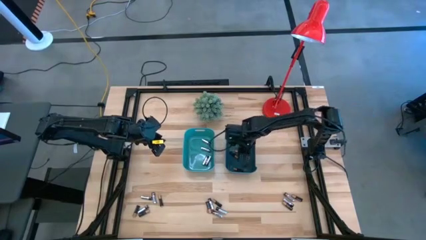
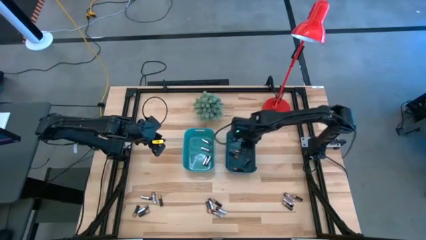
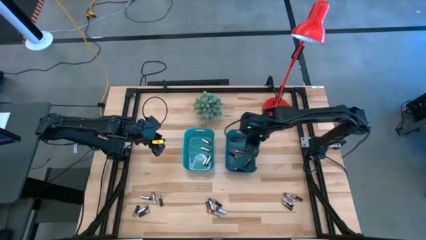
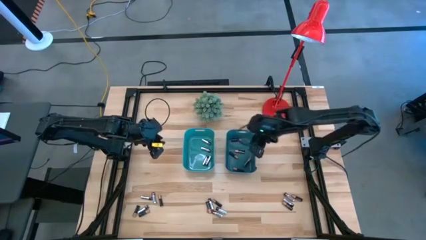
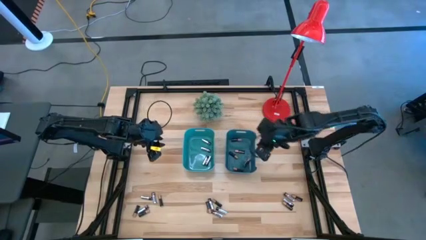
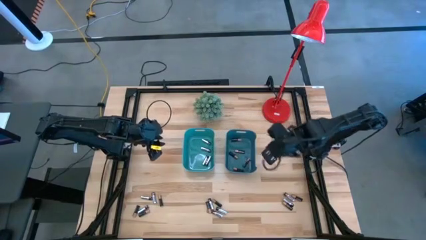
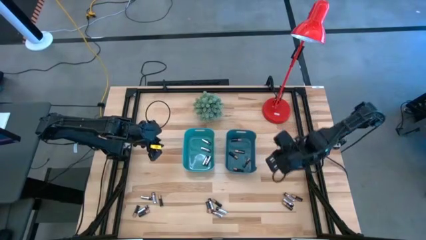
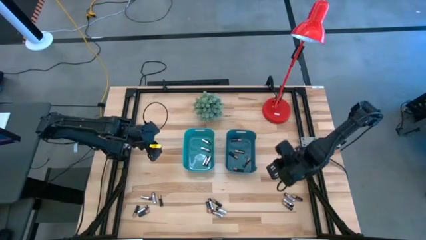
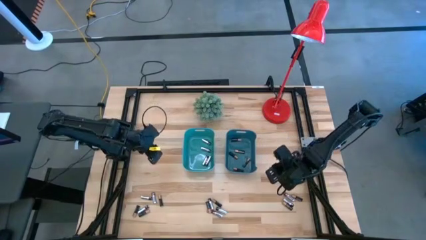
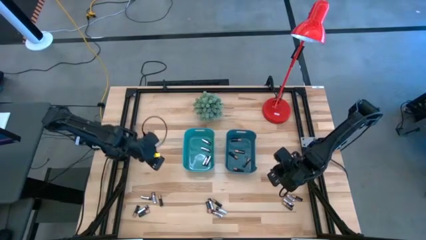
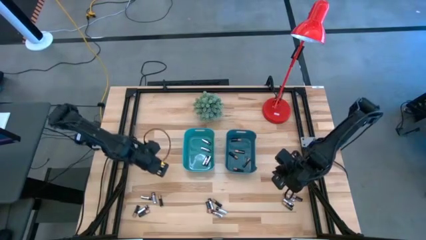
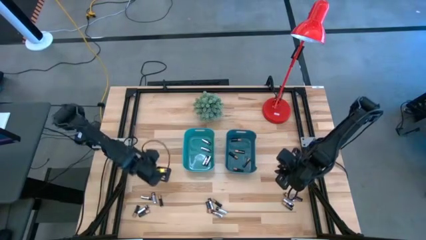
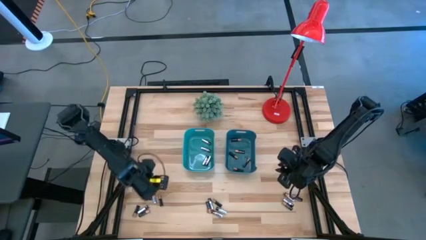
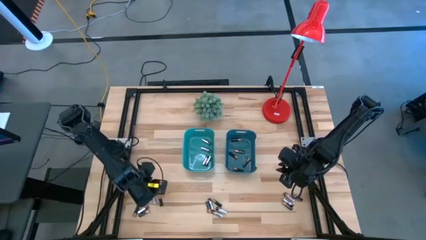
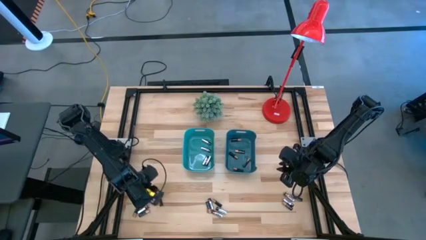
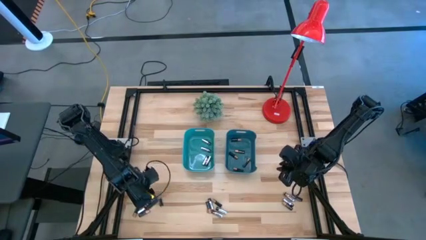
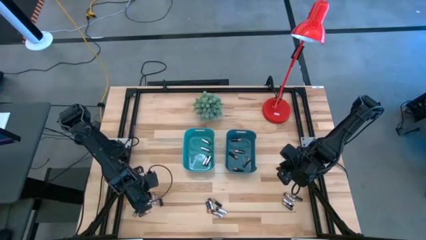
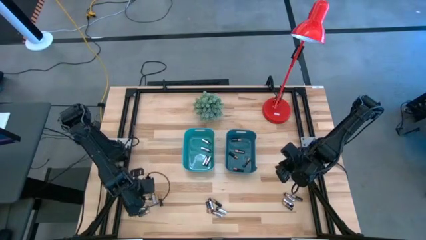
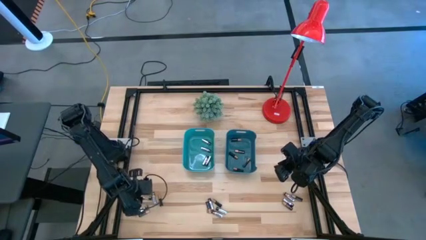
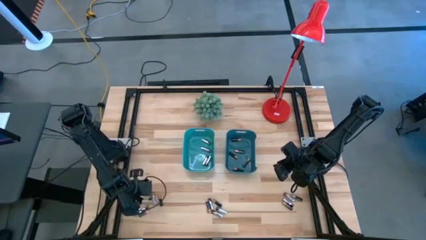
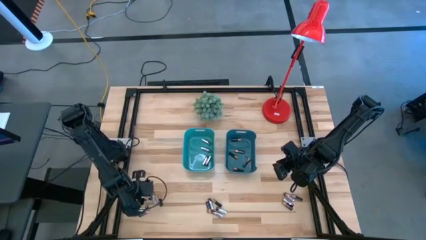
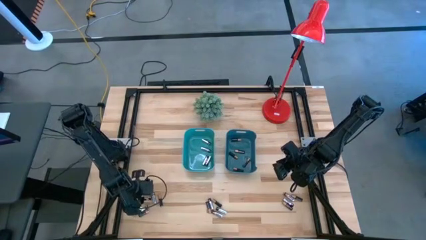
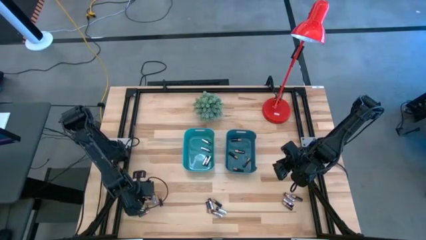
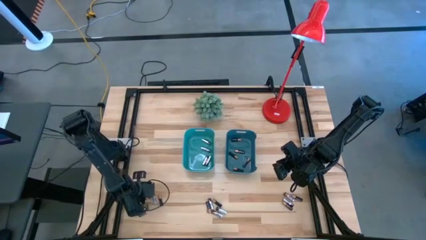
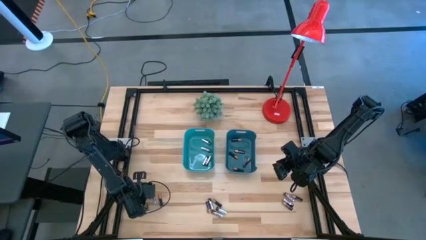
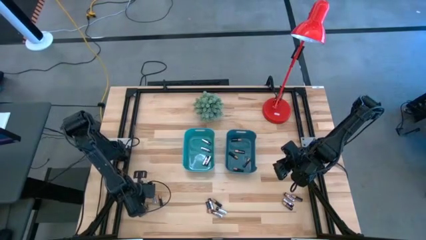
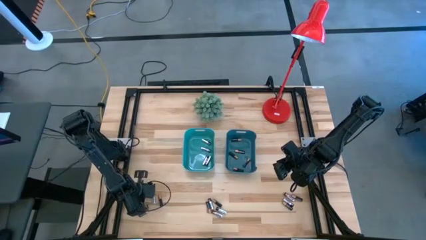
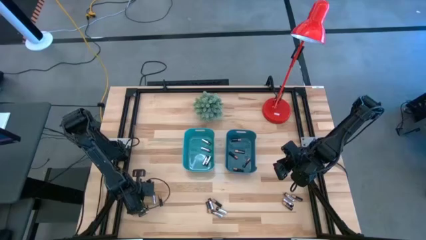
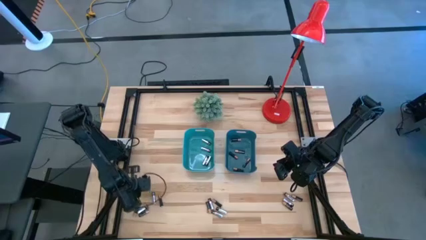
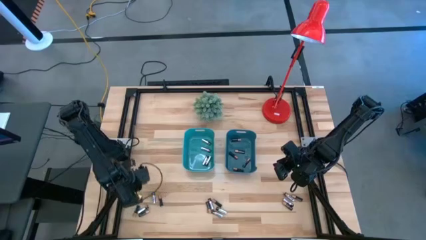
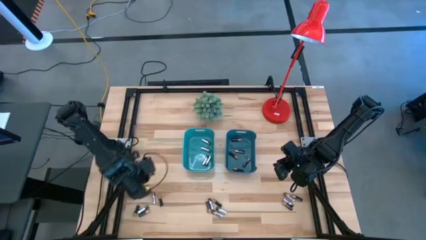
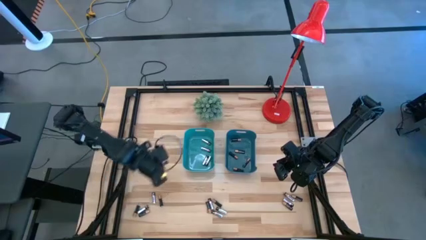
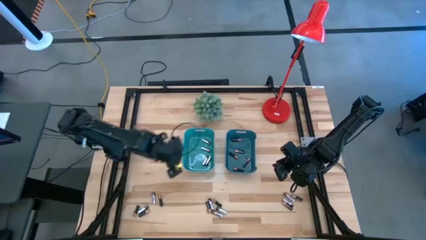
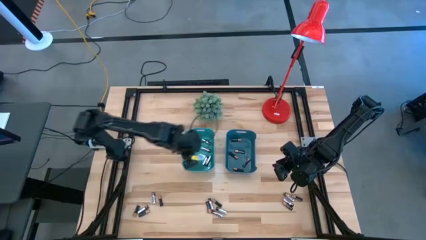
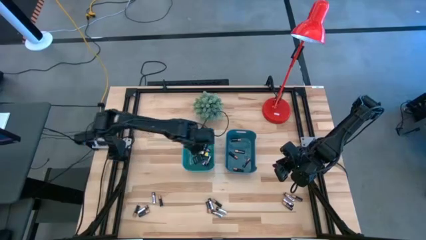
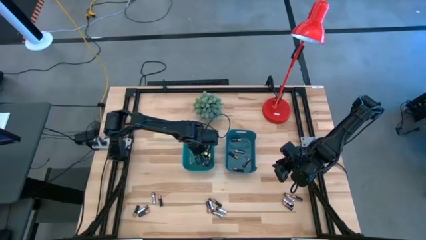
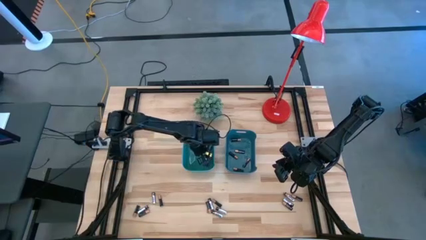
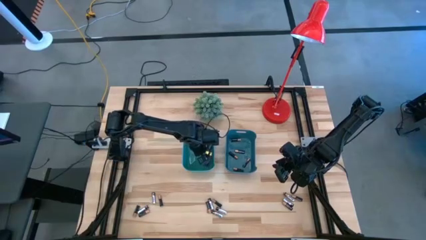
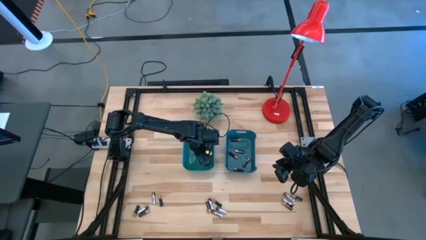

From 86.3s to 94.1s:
Task: Sort batteries
Put the silver battery into the green bin

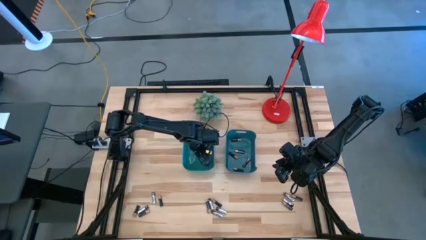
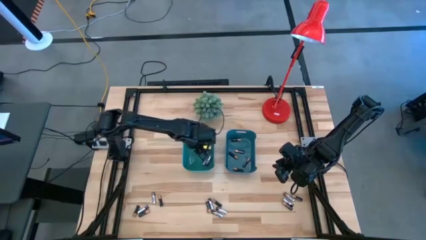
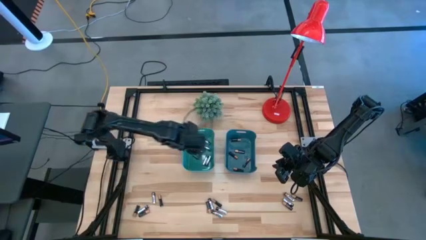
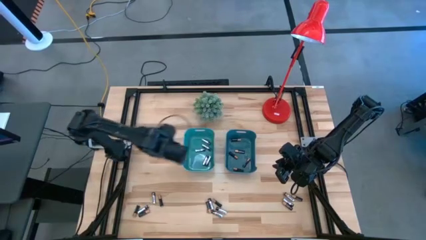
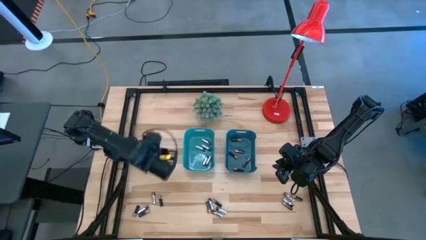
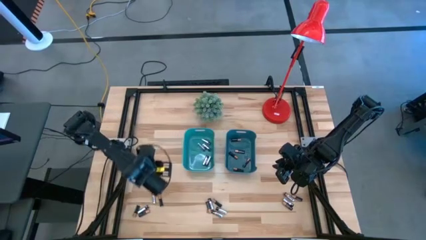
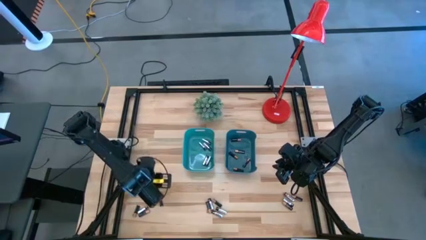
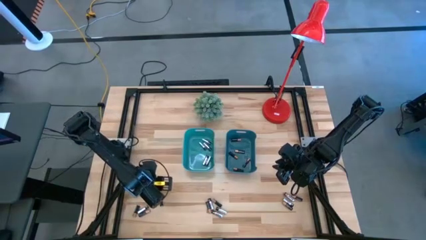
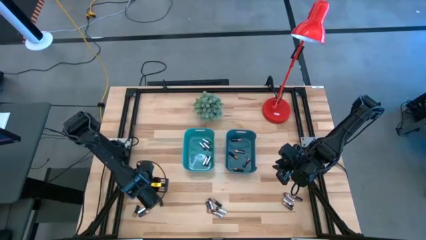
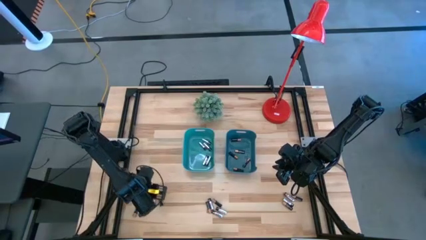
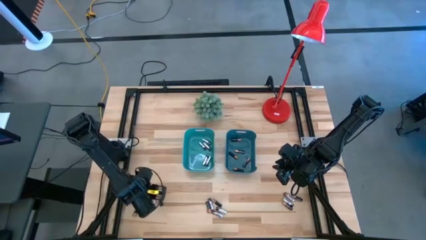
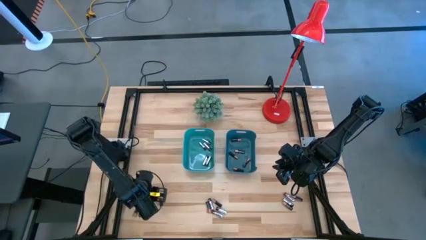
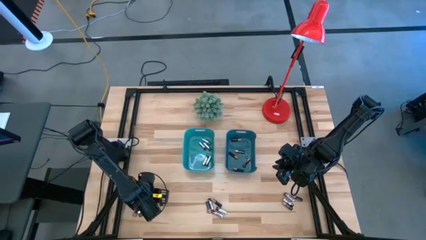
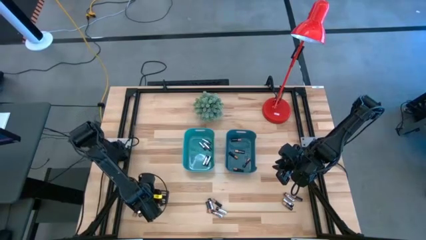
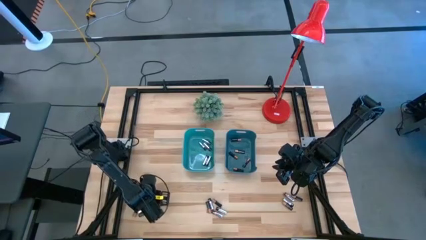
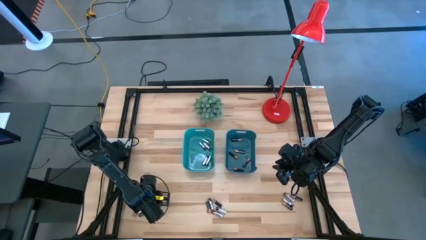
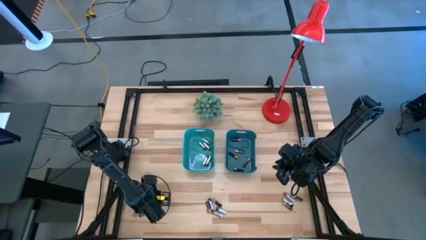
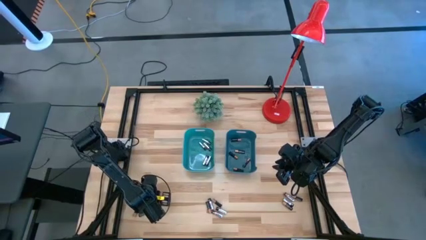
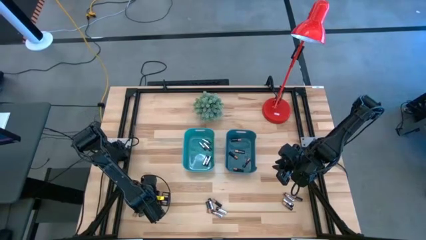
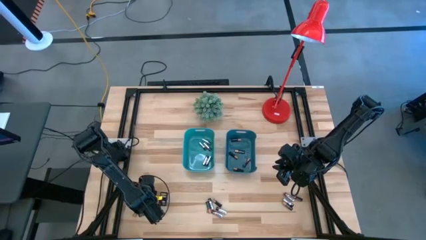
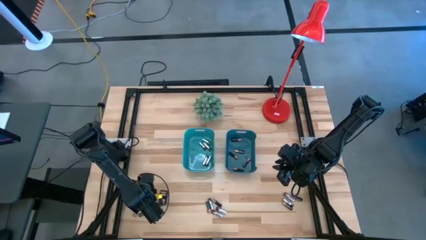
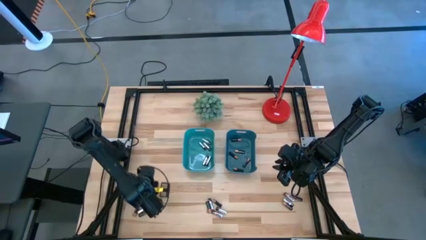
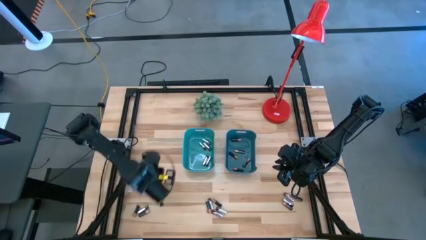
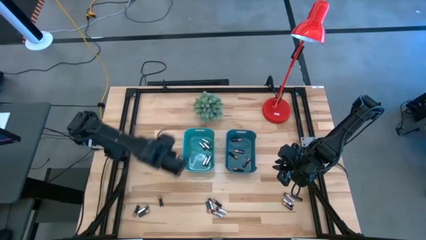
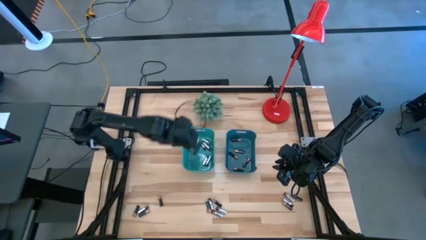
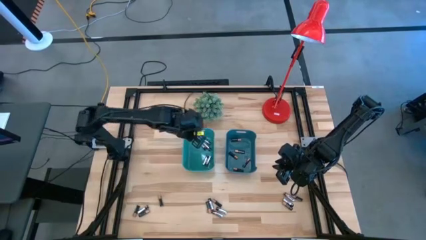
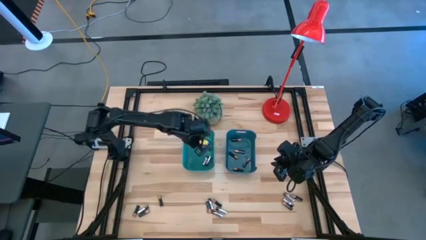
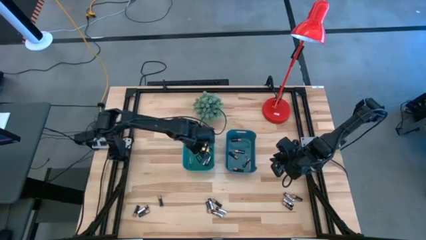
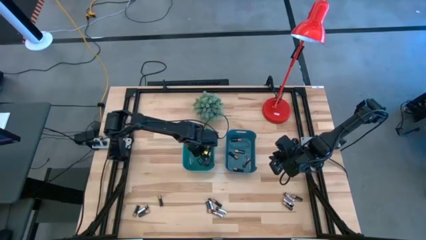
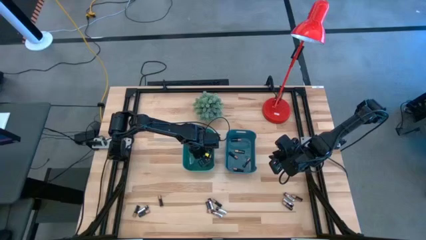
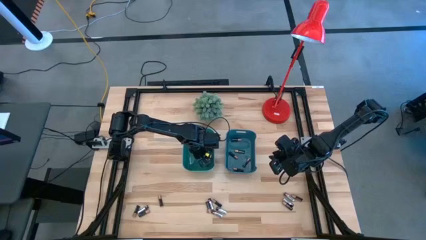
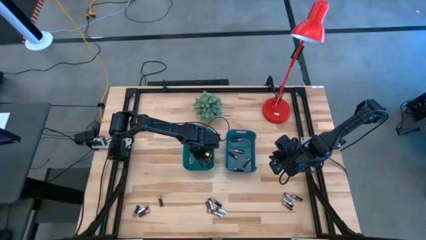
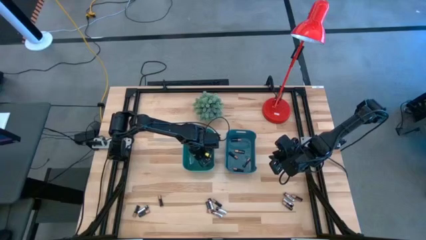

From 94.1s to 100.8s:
Put the silver battery into the green bin

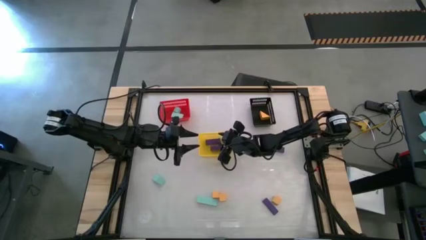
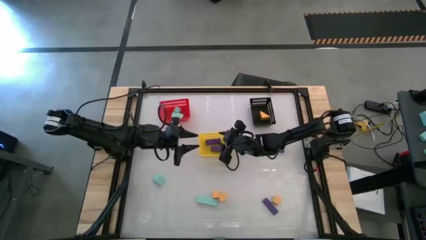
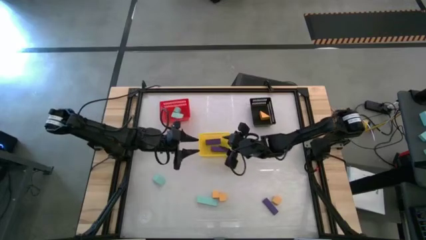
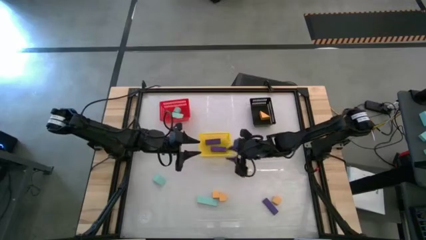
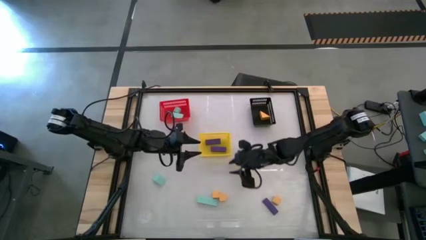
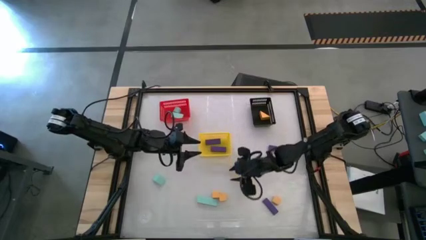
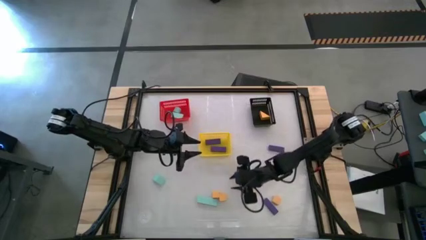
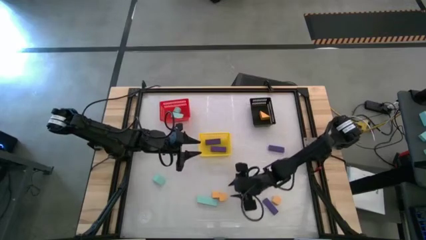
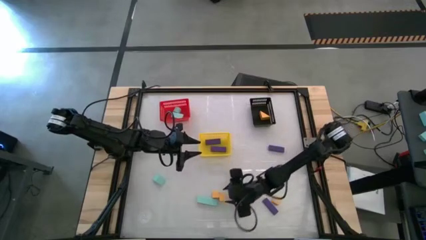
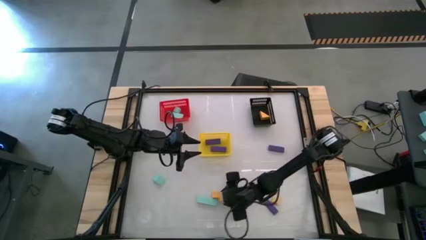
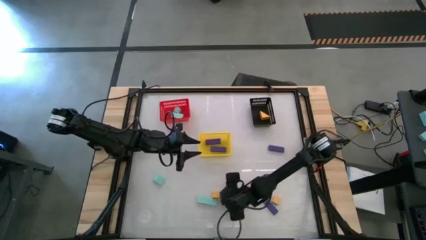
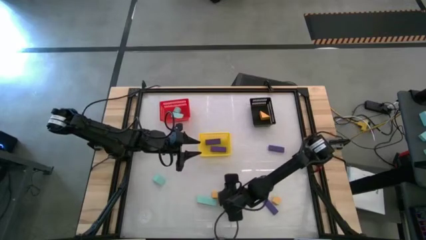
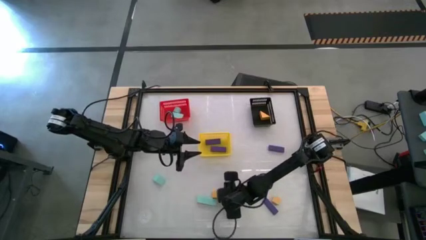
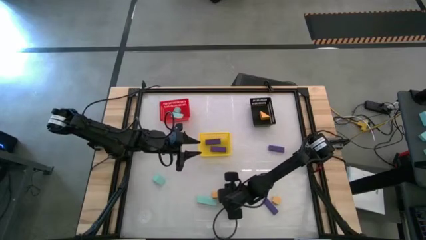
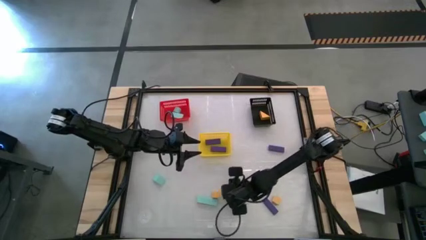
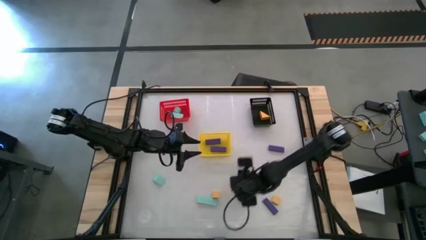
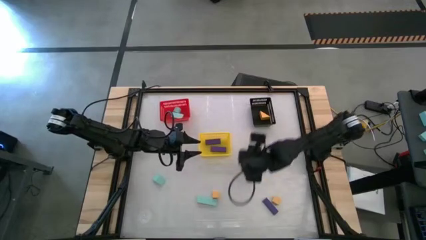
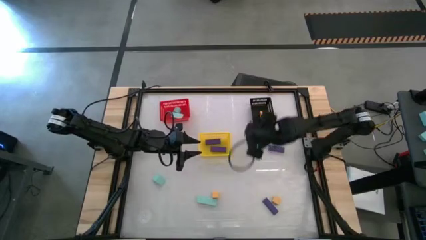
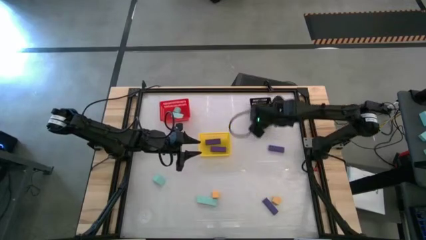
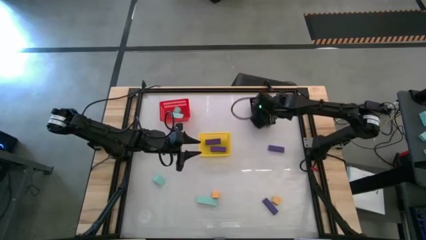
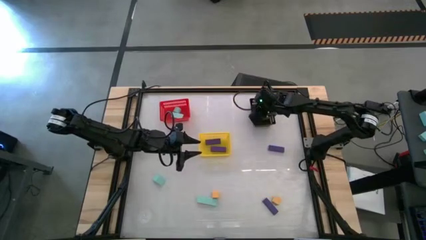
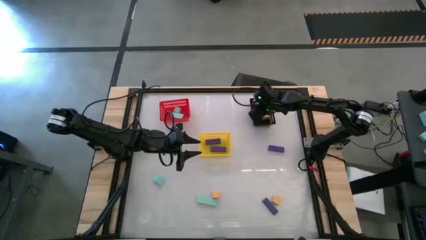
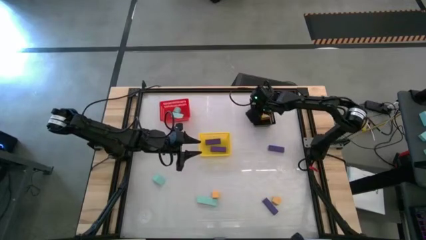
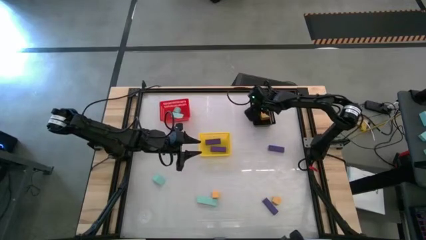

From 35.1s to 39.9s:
Task: Sort & place blocks by color
Put the orange block into the black bin
